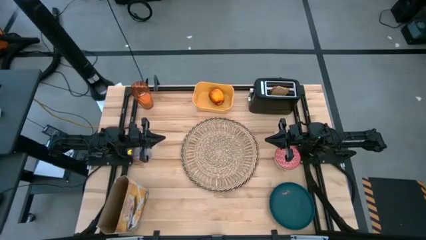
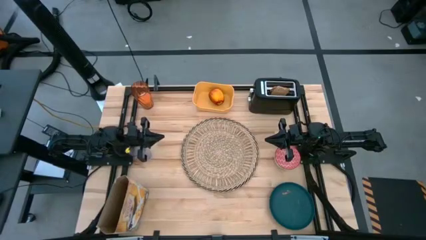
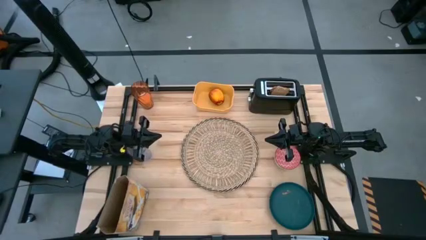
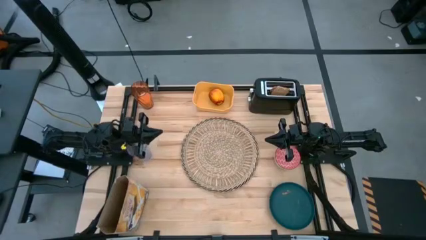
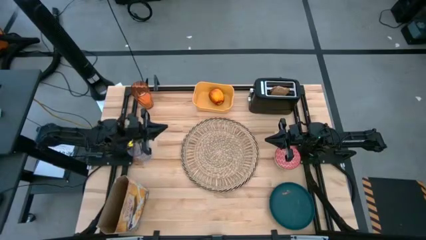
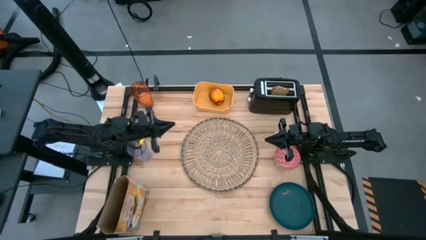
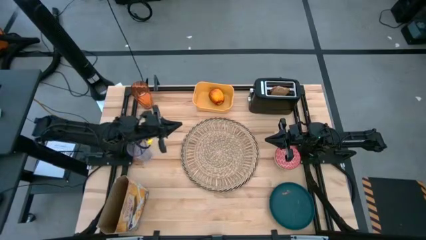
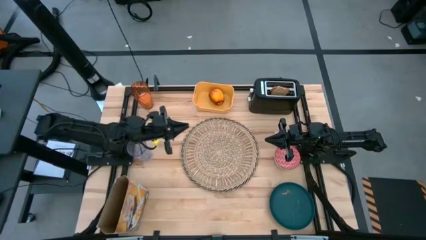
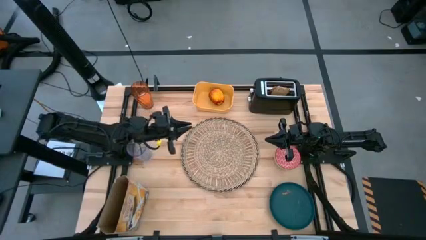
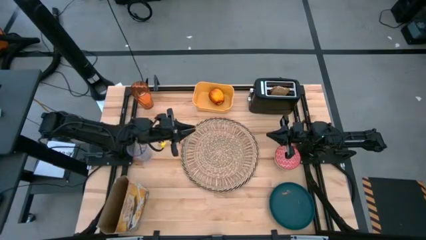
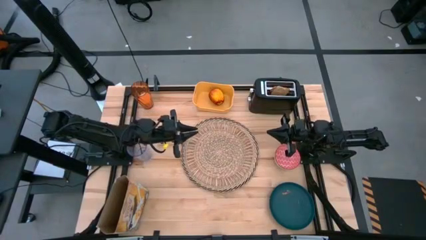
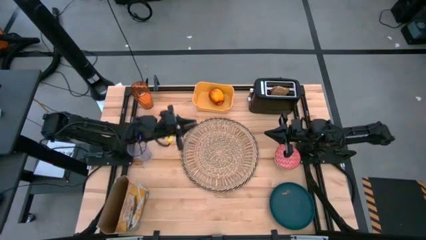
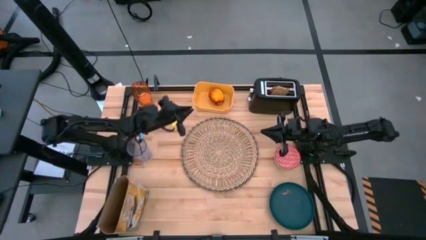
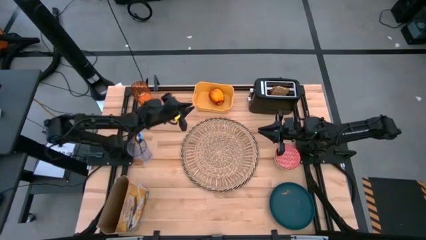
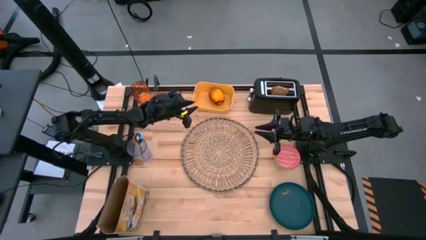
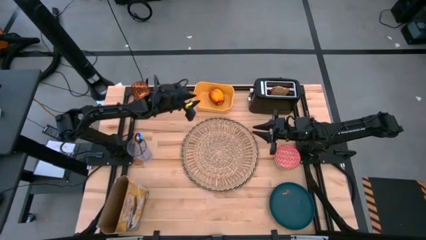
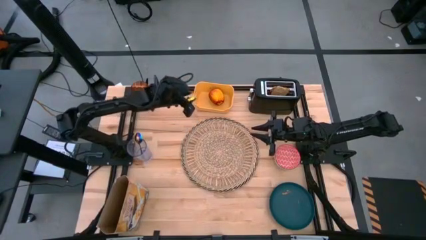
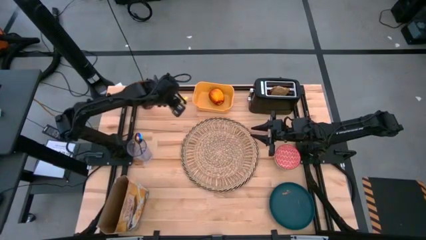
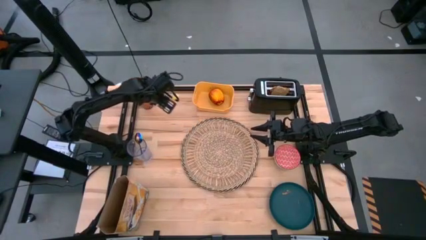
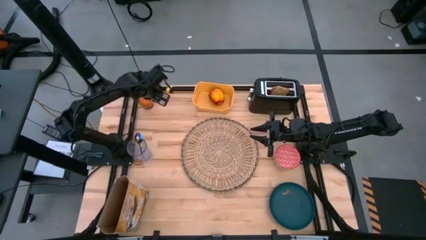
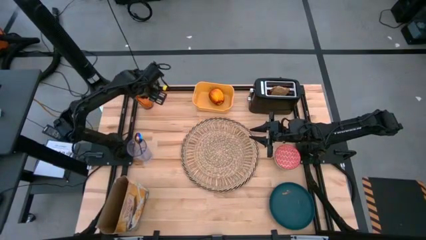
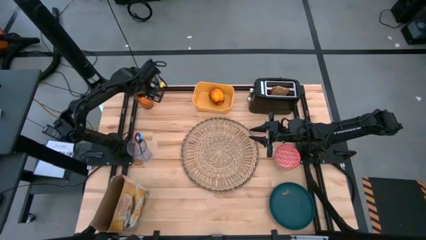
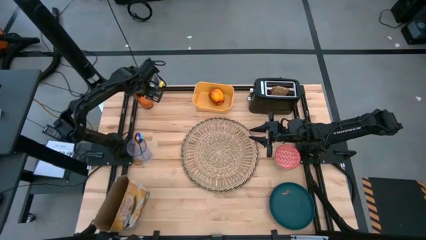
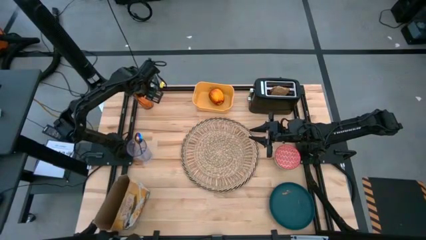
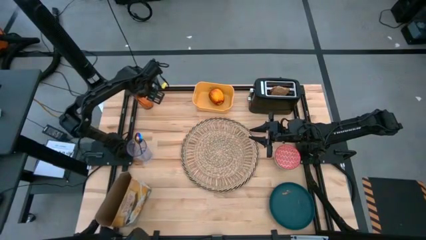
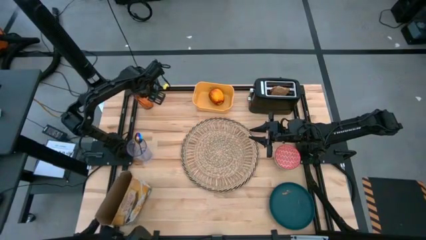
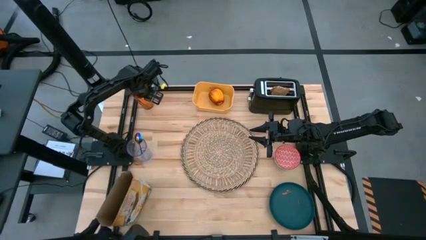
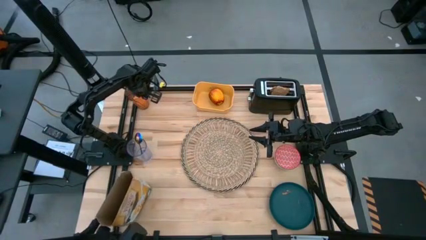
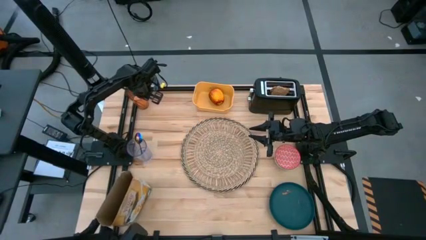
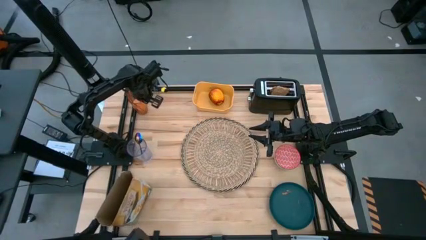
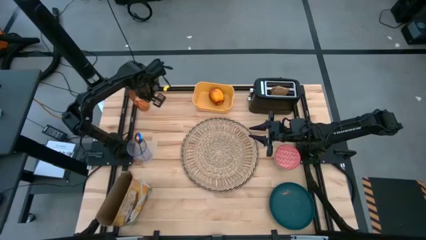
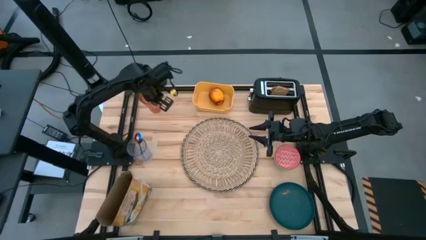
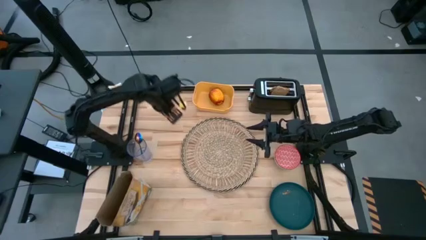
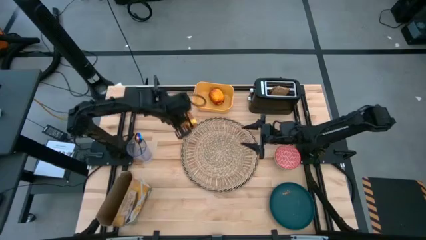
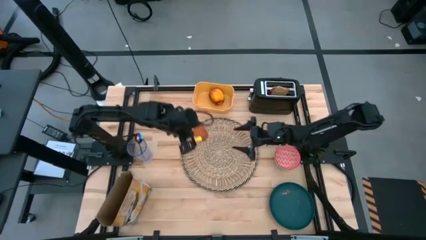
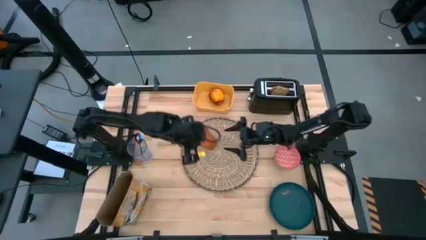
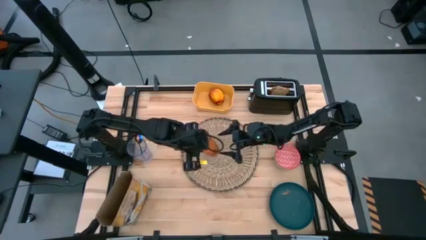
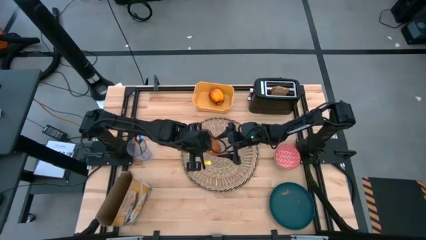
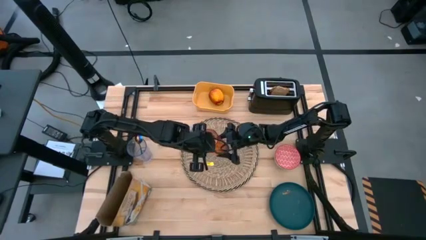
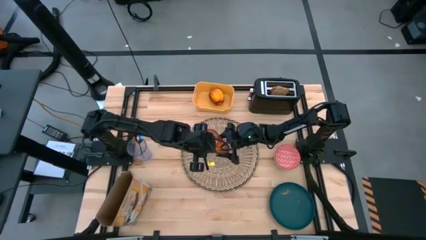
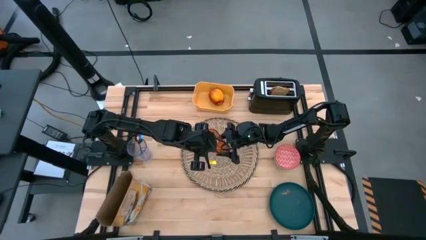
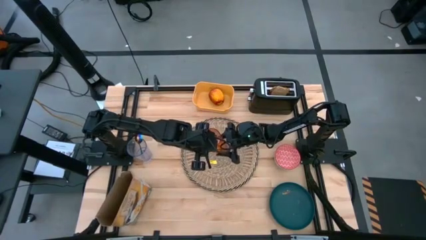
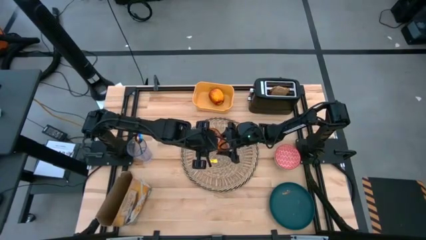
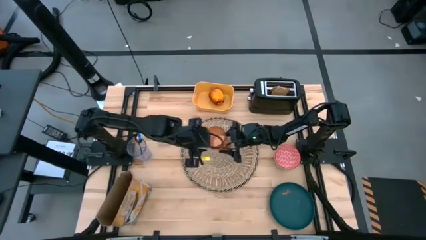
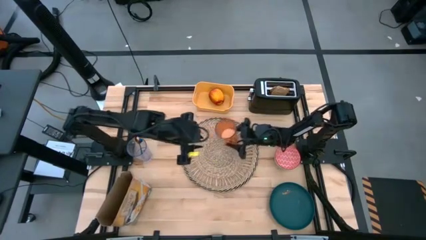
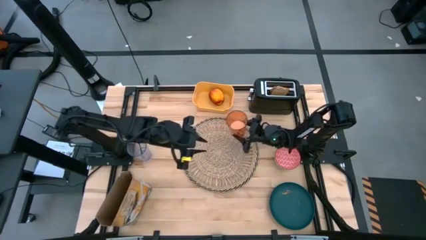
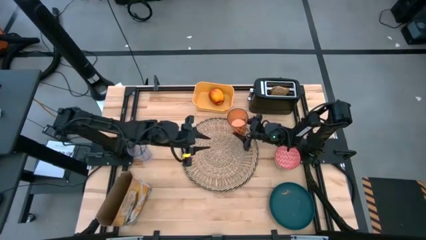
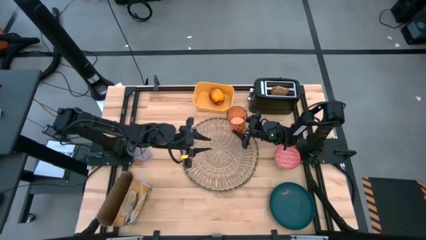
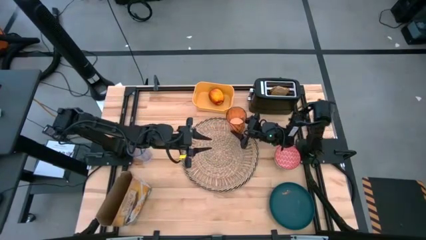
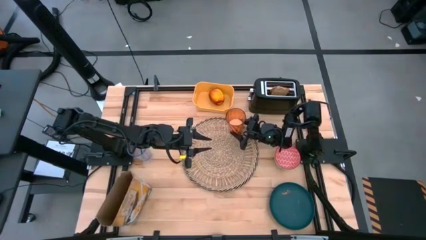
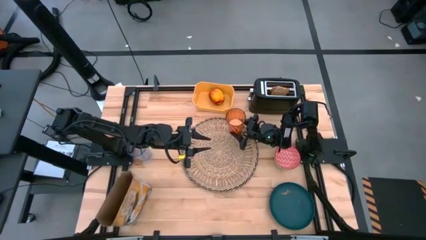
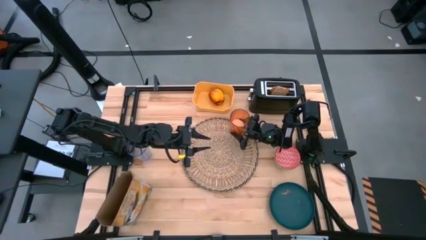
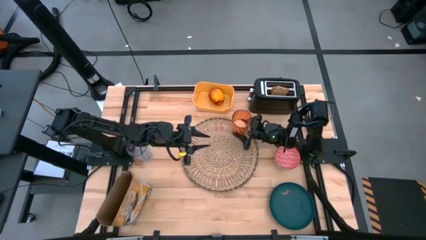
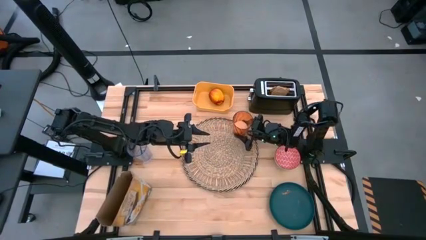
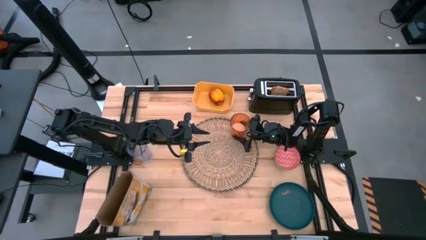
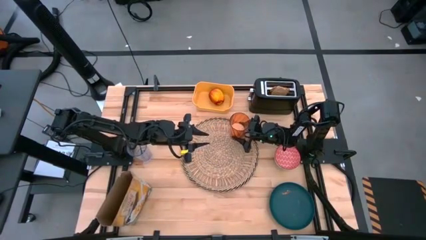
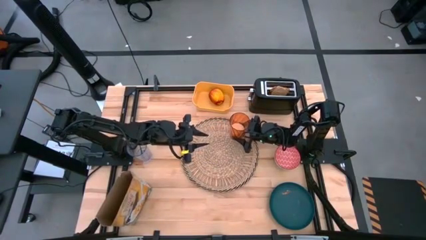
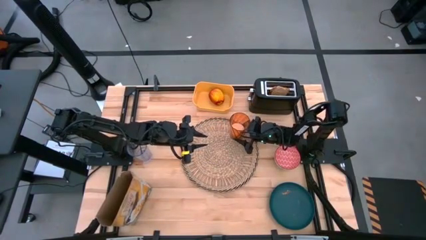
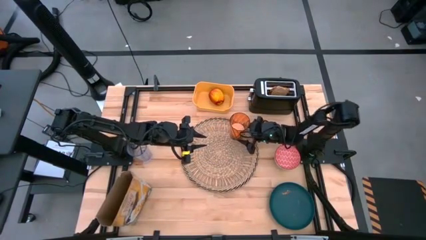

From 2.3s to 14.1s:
Task: Arrange a breakfast setting
Put the brown cup on the brown table mat

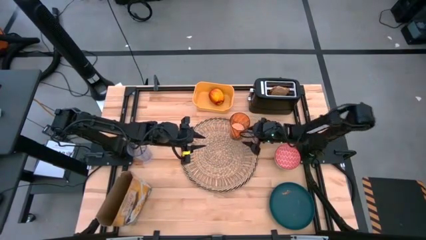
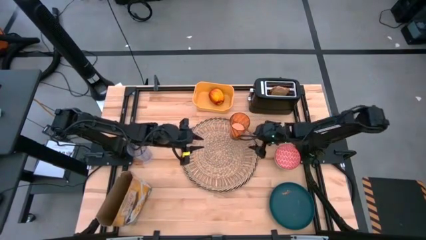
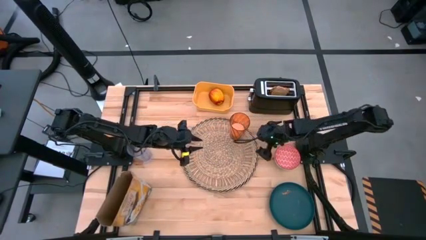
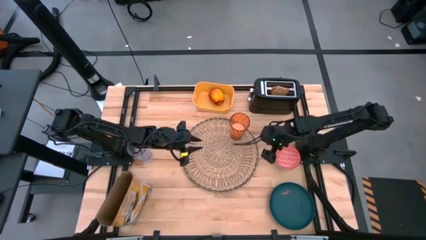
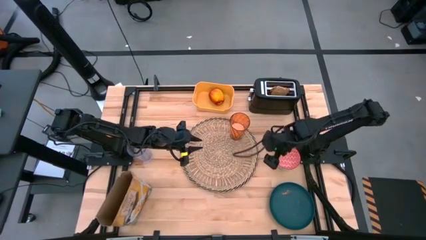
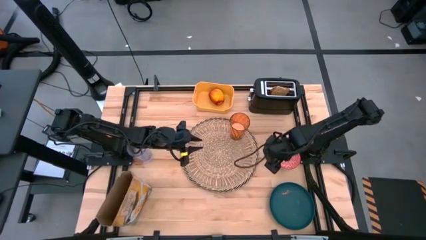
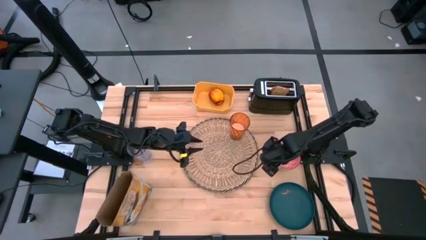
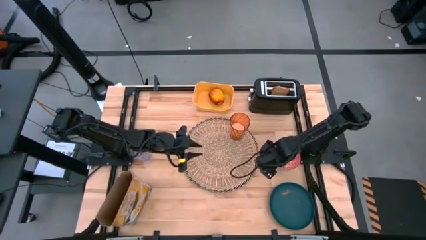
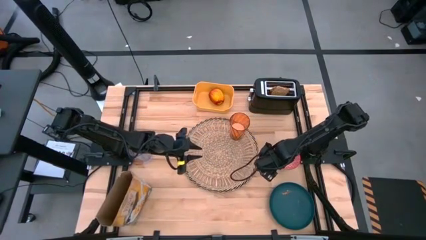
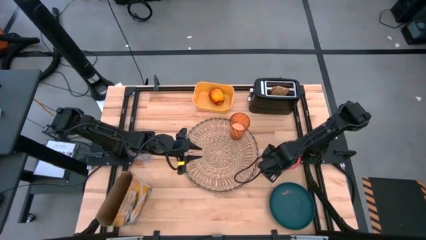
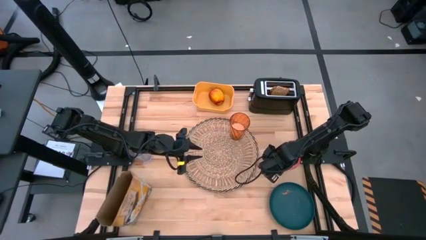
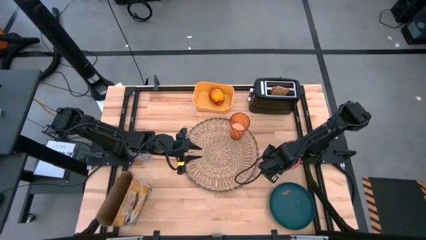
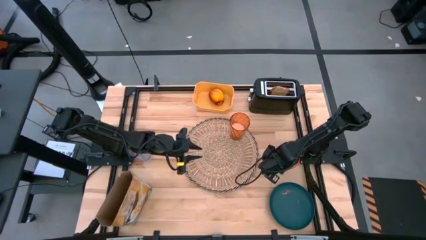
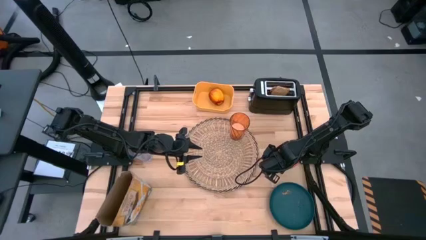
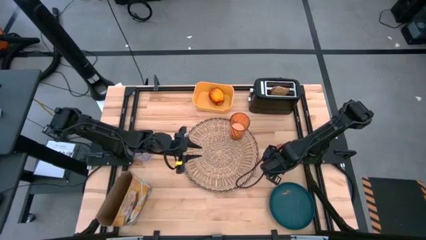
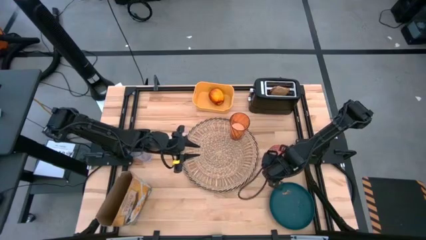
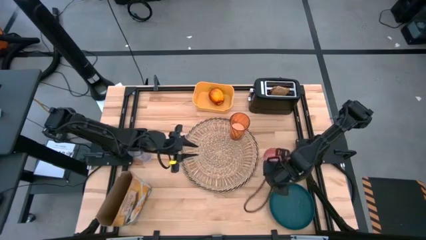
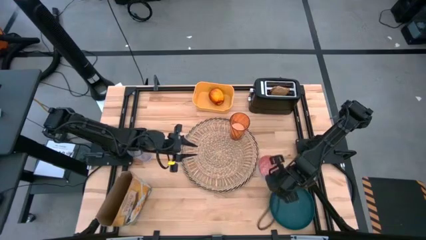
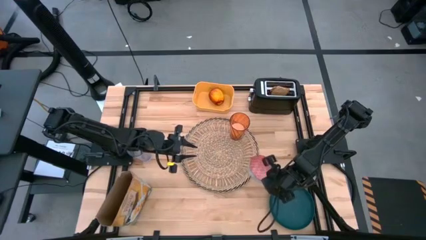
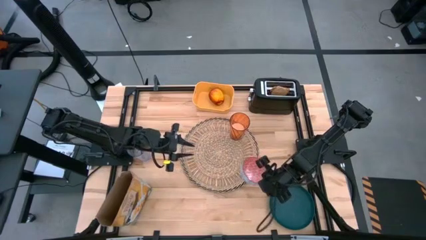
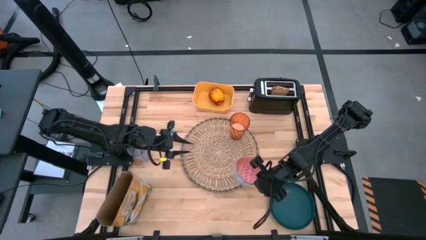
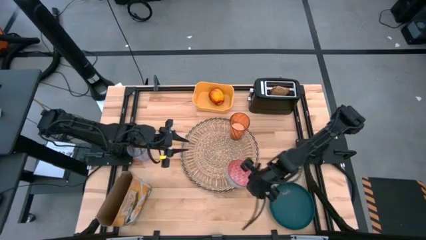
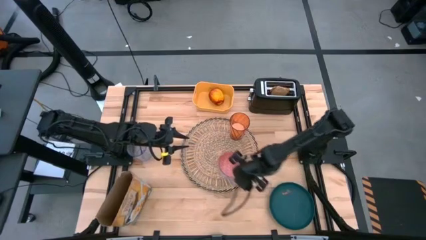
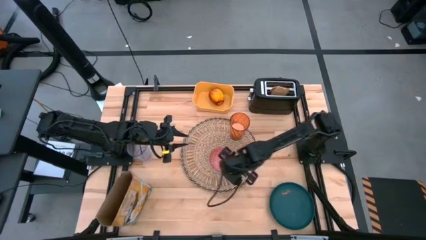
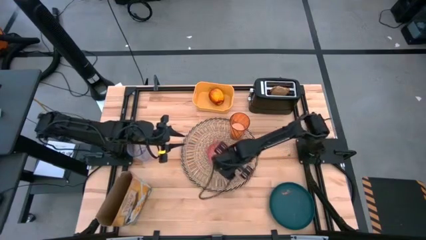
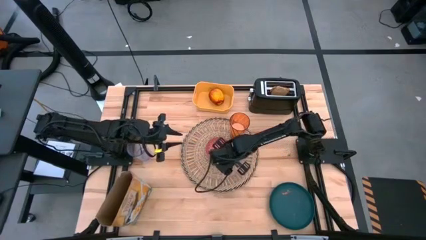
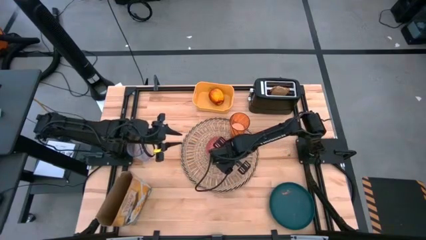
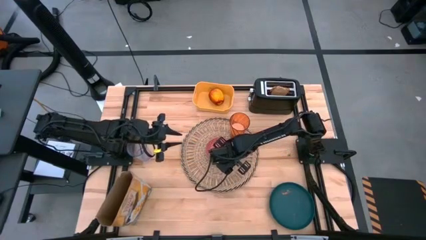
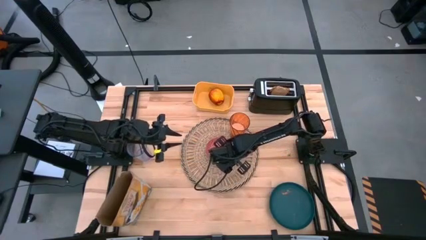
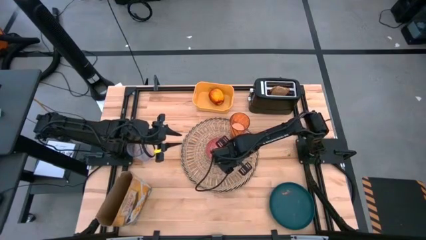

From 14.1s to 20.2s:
Put the red bowl on the brown table mat
